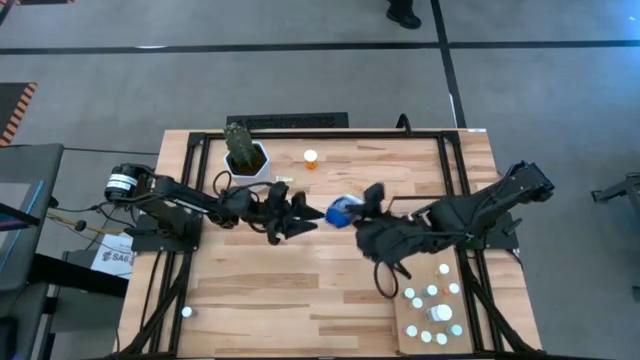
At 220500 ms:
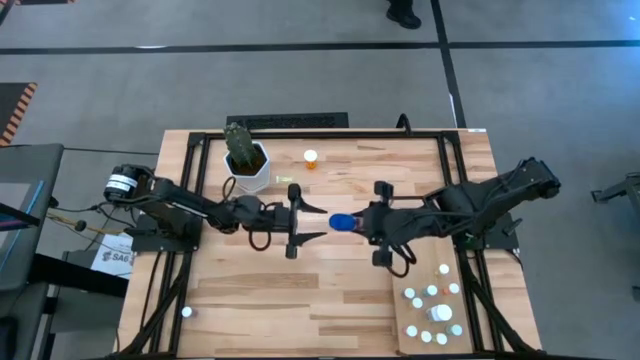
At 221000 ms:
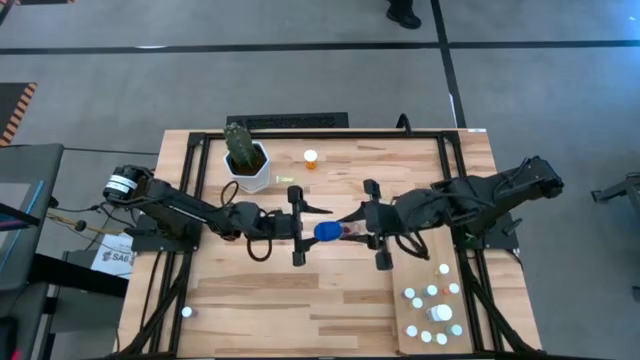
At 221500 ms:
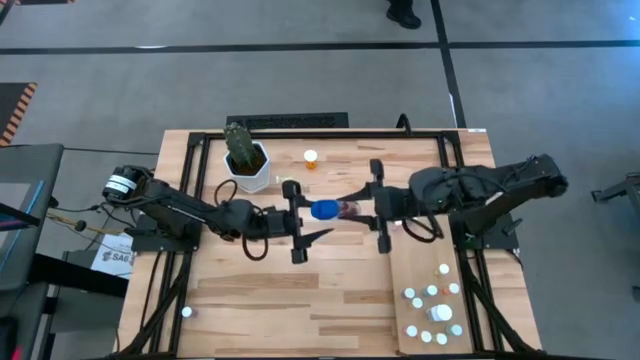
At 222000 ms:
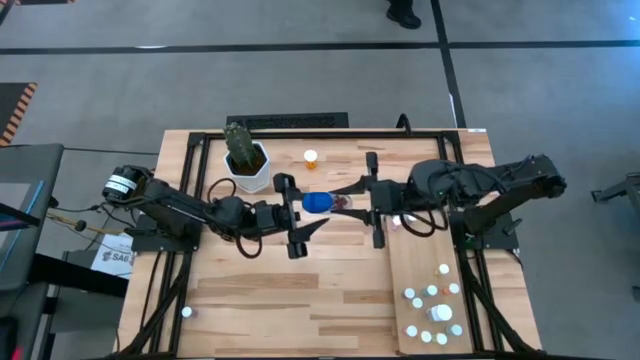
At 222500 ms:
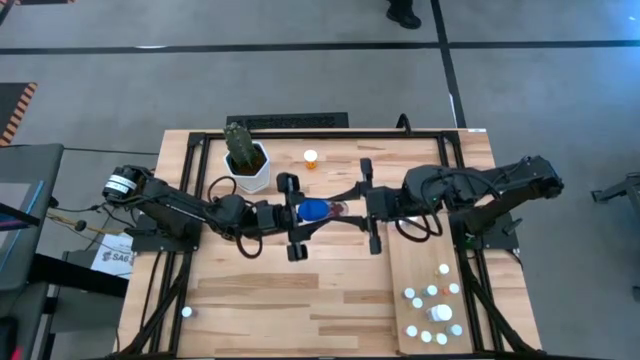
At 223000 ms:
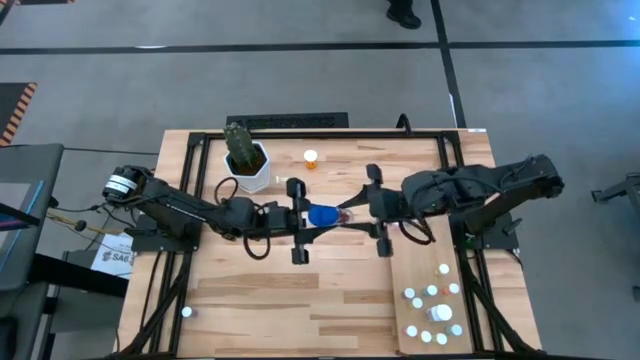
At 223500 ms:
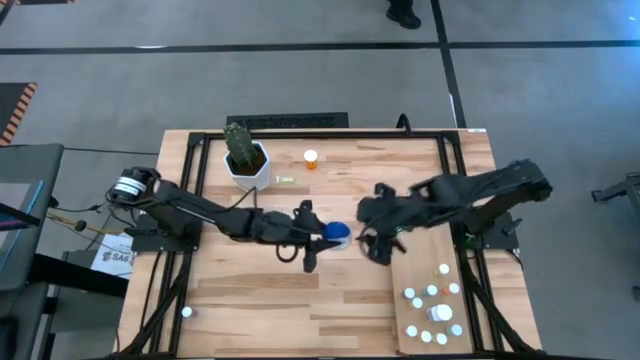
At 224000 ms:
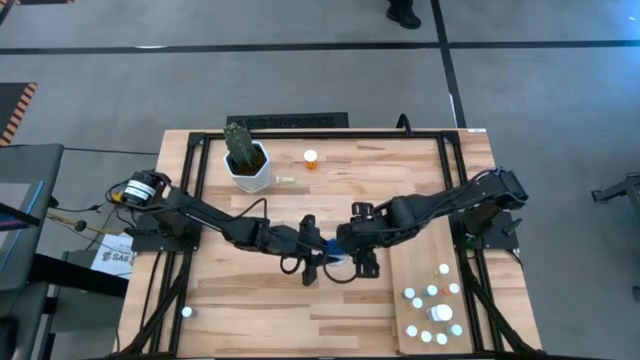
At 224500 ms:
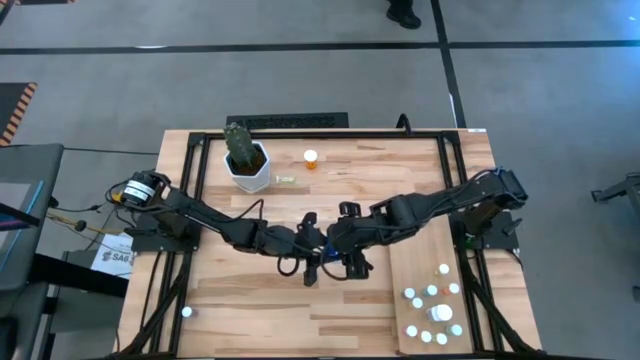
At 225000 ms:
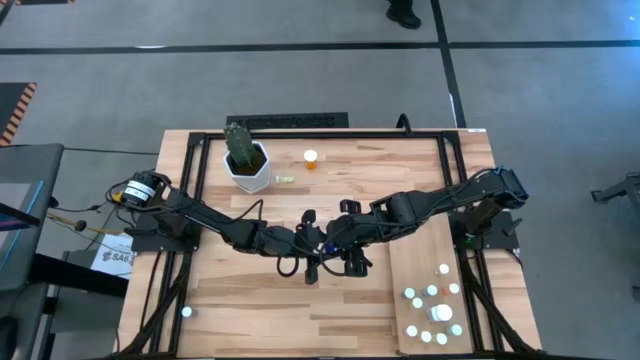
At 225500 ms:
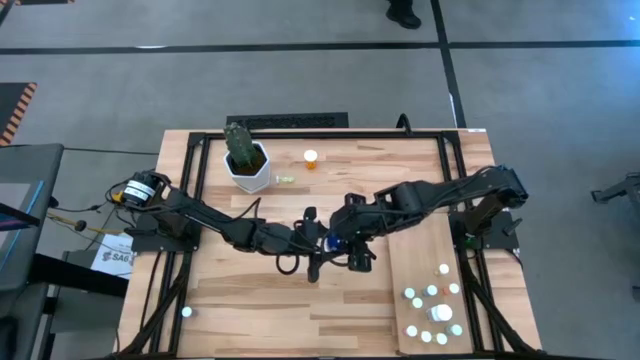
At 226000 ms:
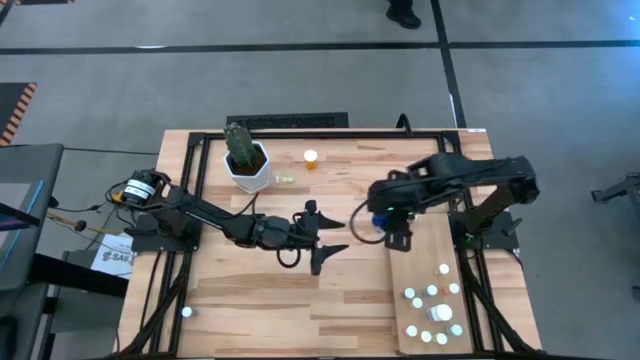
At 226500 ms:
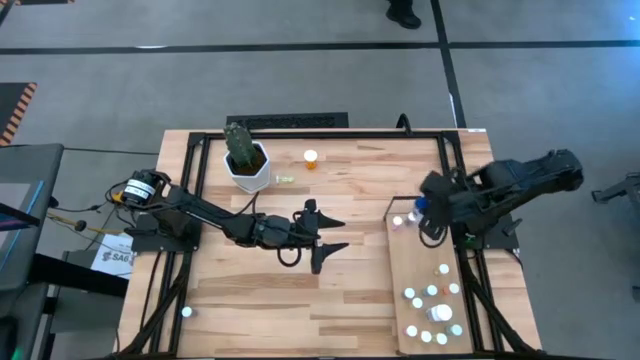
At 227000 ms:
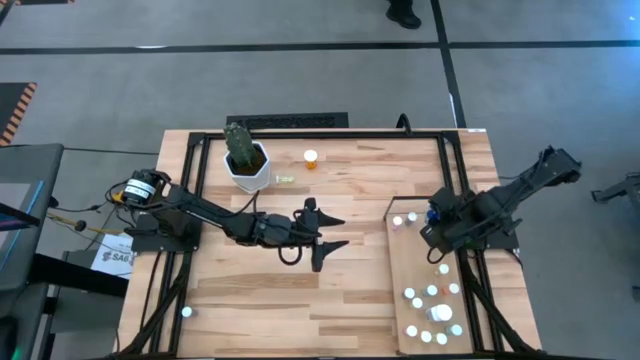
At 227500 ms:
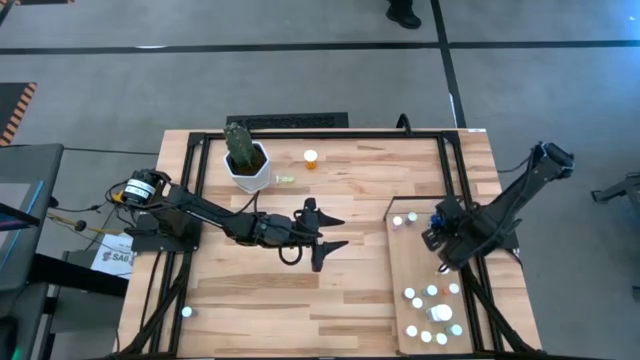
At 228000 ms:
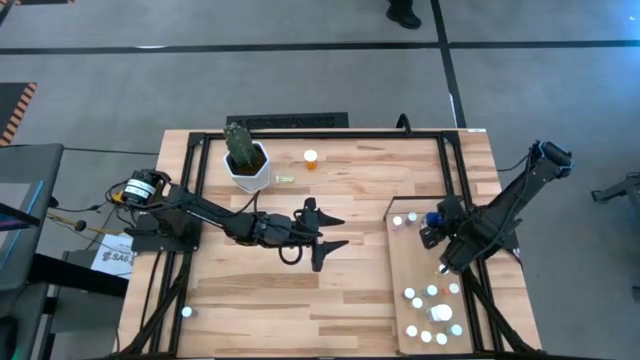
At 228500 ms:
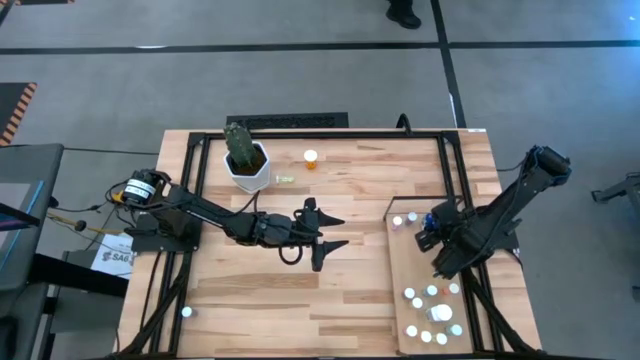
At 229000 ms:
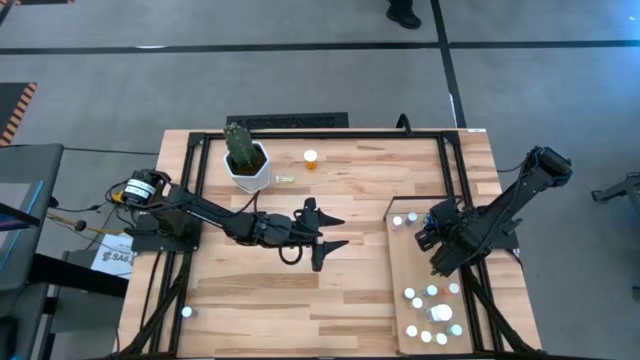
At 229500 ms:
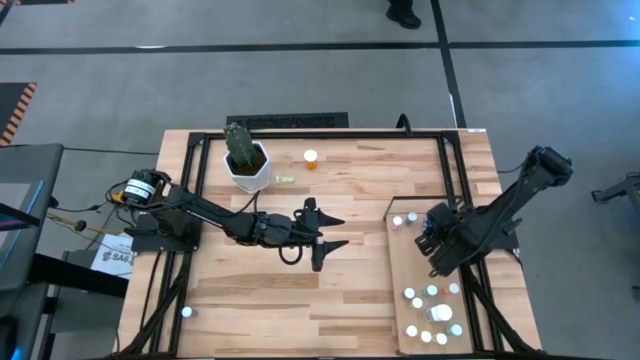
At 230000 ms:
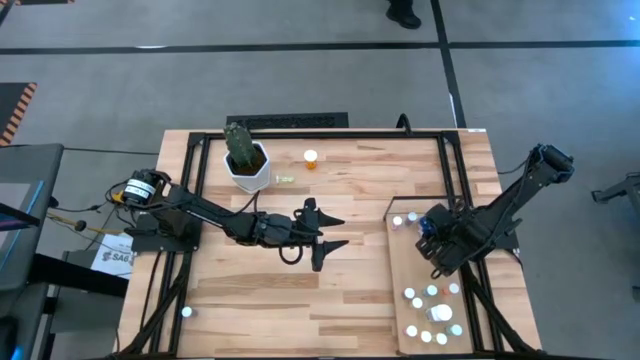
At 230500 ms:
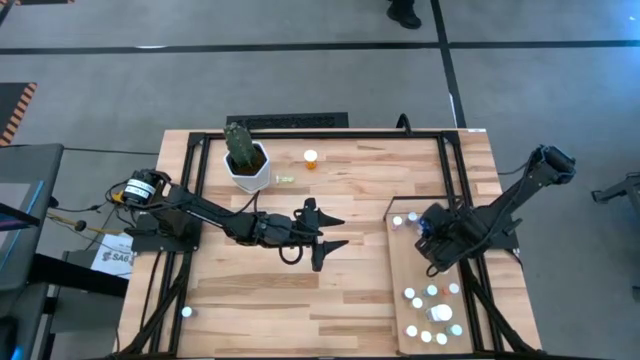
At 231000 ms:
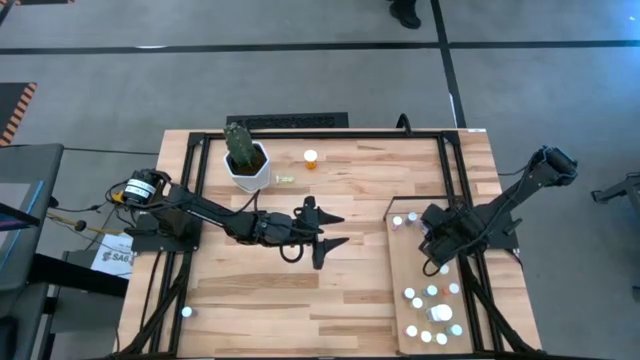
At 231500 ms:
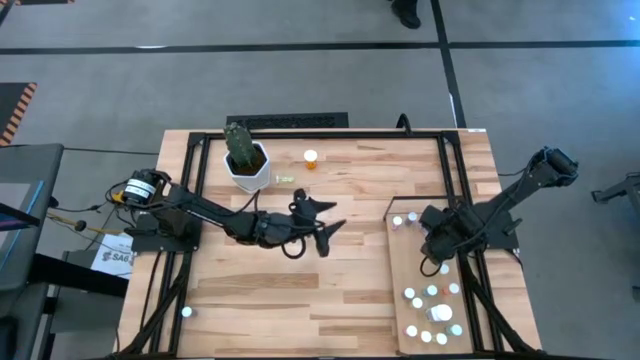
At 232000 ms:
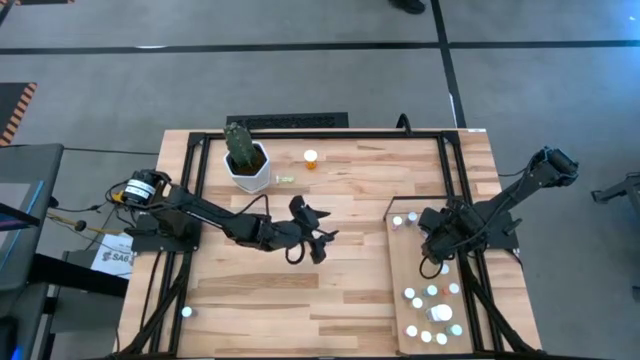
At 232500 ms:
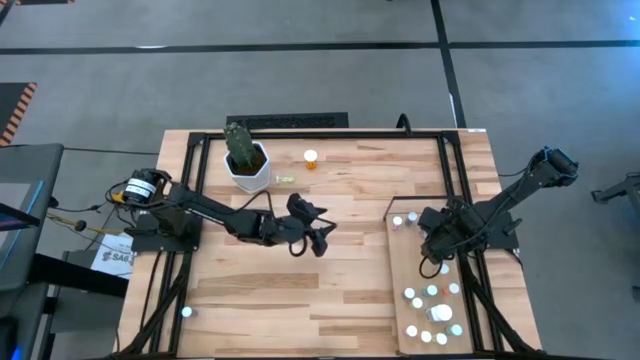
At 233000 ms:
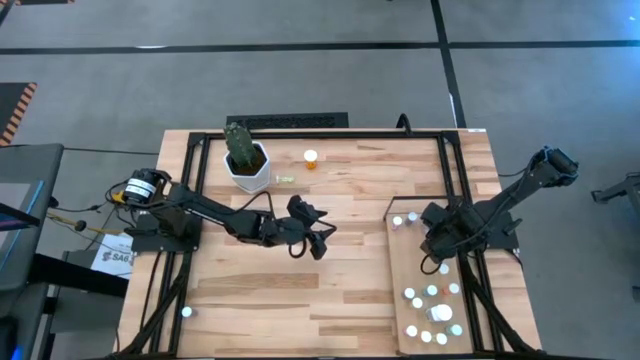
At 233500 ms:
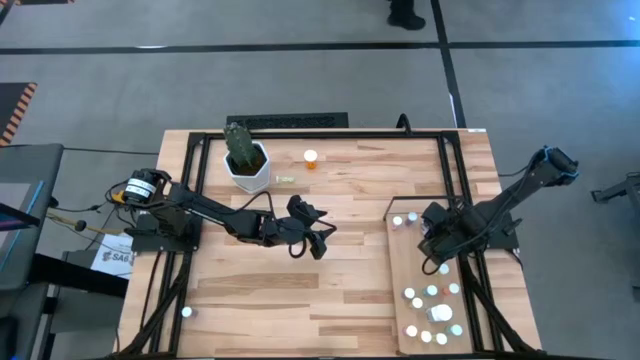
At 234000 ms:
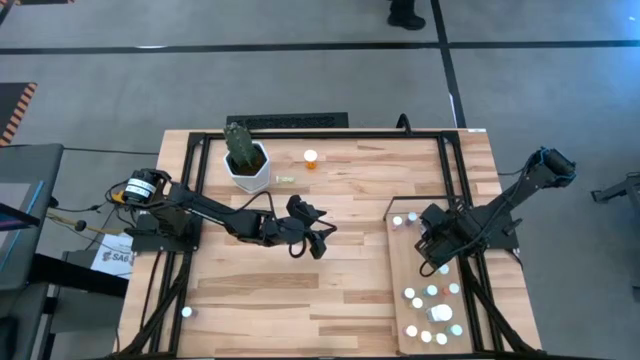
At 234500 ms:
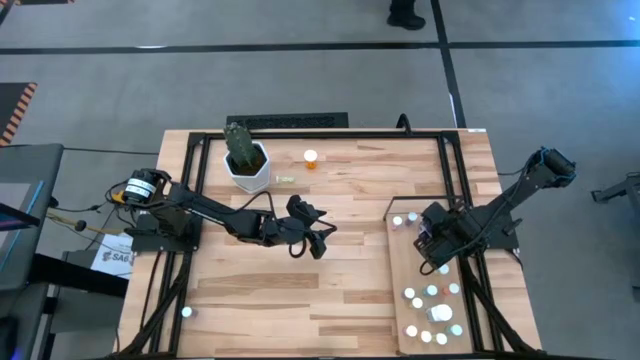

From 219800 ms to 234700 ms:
Task: Pick and place medicine bottles onto shelf by color
Put the transparent pill bottle on the shelf

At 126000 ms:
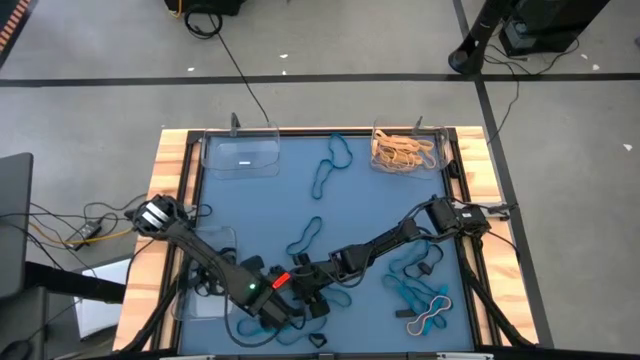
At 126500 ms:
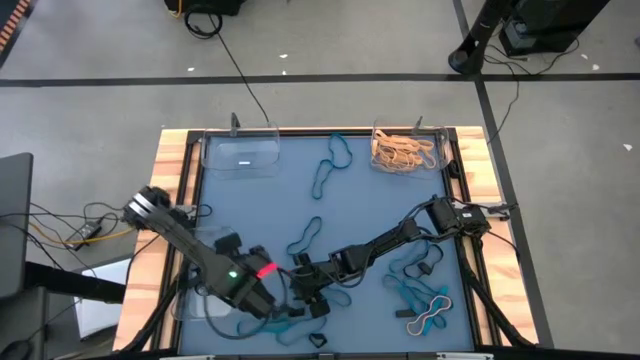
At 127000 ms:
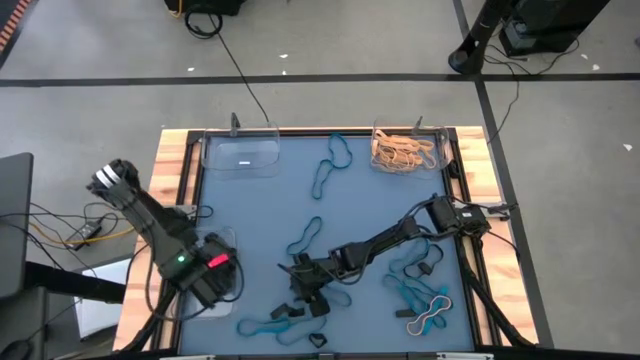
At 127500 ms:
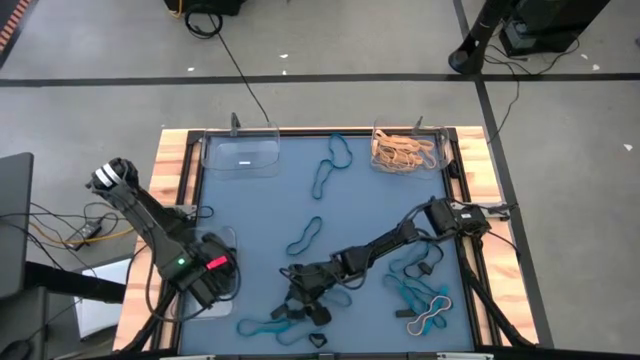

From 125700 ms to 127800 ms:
Task: Sort rubber bands into baskets
Put the small black rubber band into the bottom left transparent bin

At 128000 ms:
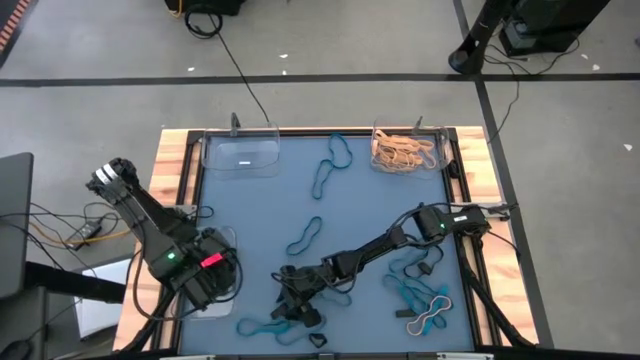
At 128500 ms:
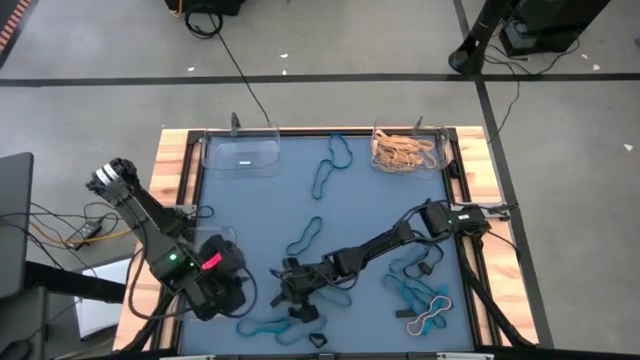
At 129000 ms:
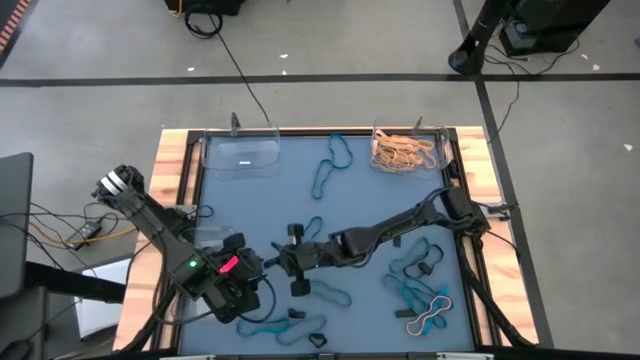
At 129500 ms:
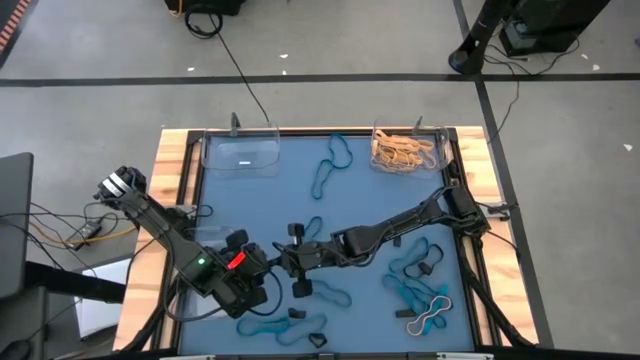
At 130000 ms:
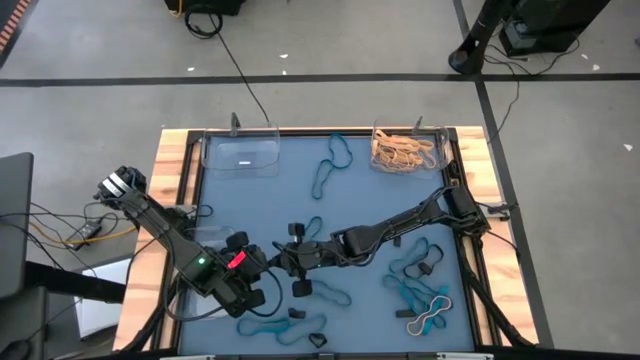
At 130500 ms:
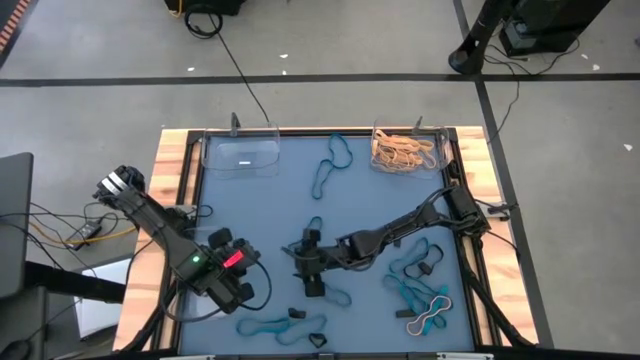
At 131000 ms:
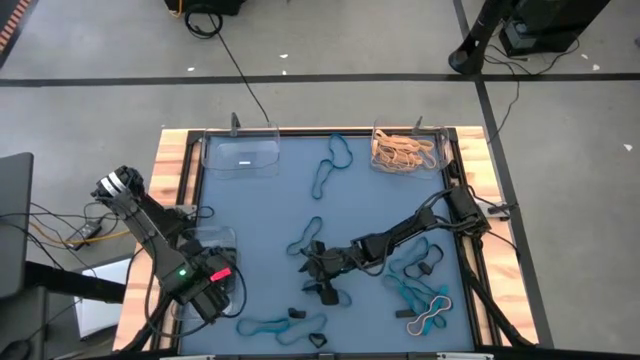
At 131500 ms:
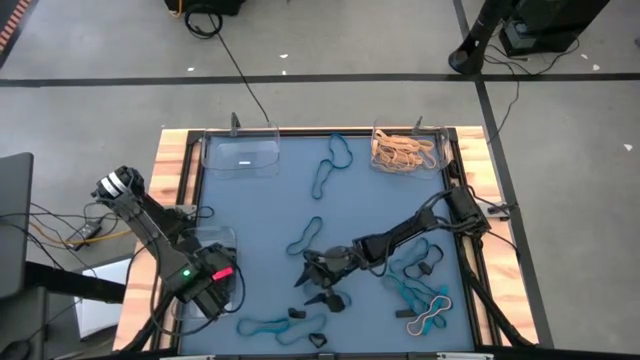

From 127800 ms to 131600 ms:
Put the small black rubber band into the bottom left transparent bin
